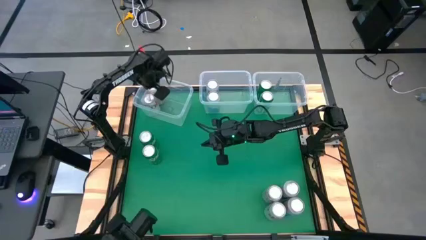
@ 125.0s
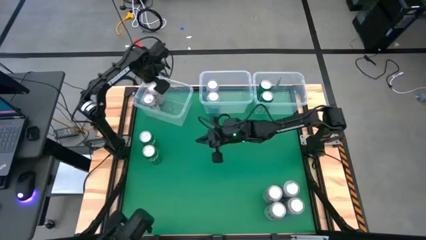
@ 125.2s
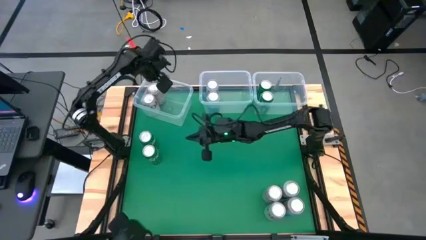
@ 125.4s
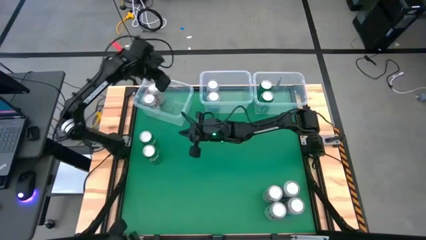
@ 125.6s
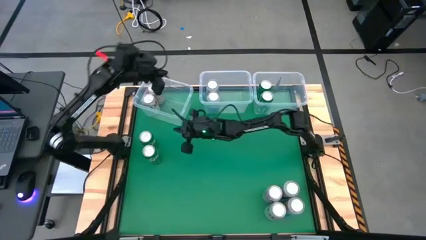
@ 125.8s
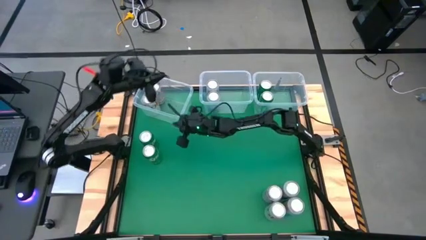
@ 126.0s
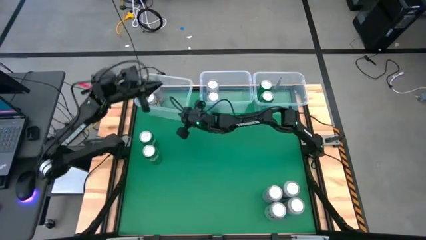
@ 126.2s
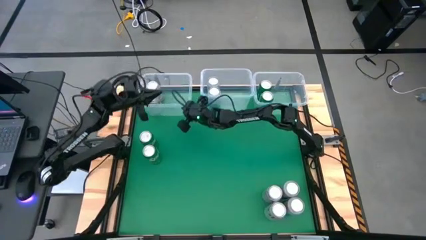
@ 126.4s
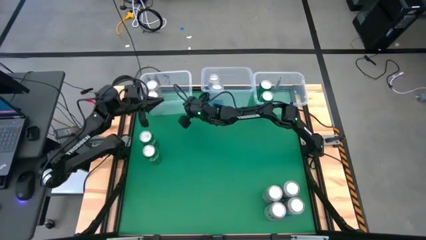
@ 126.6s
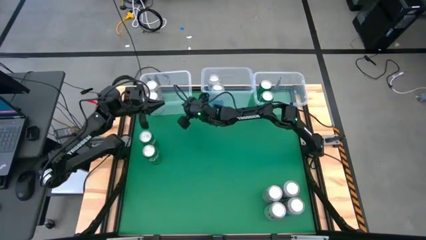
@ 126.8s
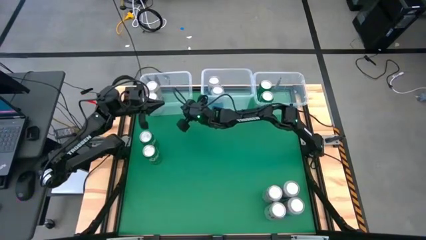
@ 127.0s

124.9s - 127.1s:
Task: Sort soda cans
Adjust the left transparent bin

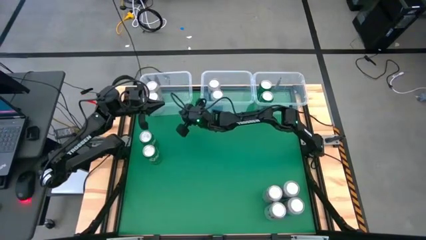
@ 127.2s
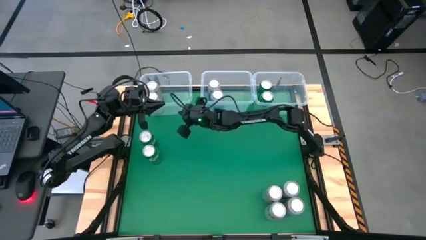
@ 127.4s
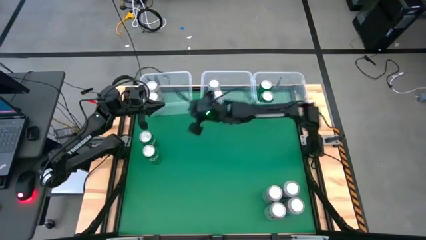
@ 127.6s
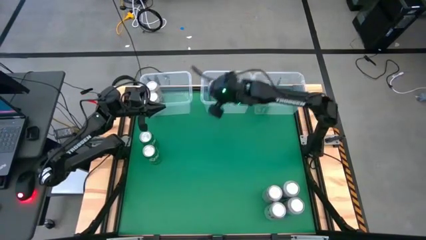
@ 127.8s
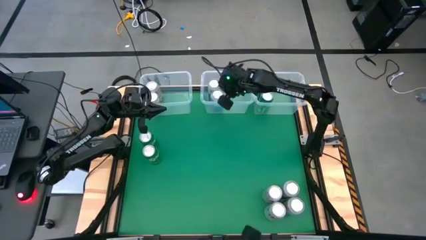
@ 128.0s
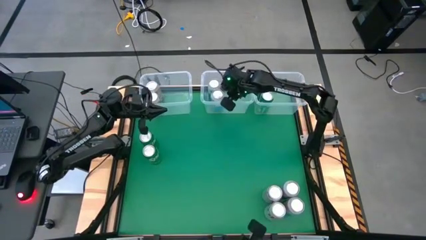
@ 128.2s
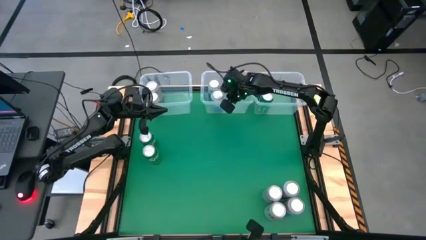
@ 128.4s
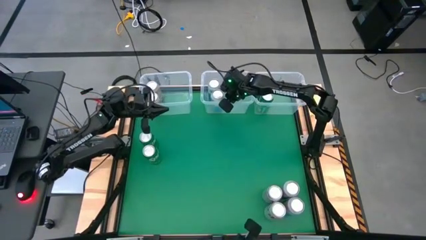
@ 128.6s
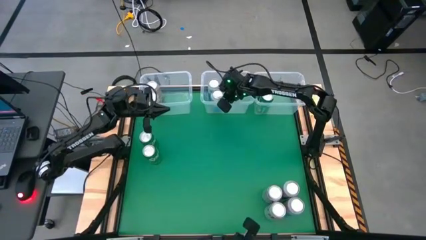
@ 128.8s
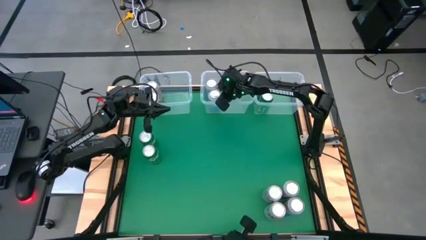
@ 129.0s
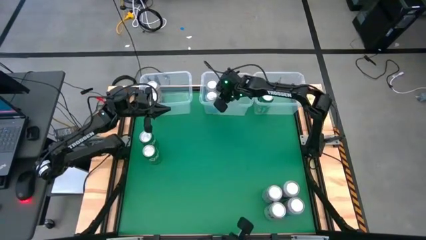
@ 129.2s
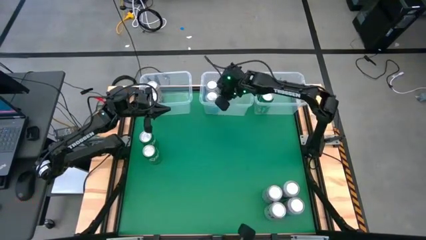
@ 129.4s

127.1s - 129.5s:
Adjust the blue white soda can in the middle transparent bin

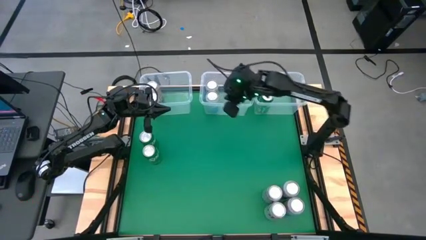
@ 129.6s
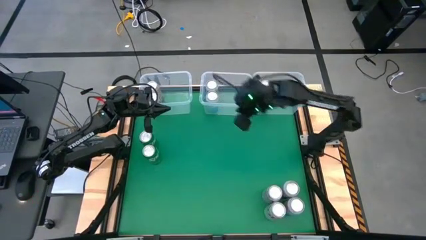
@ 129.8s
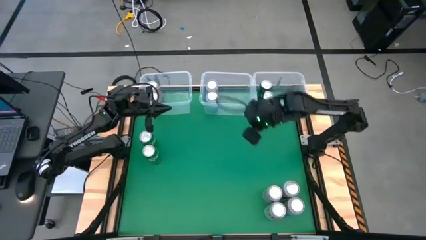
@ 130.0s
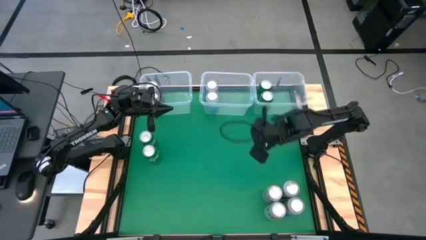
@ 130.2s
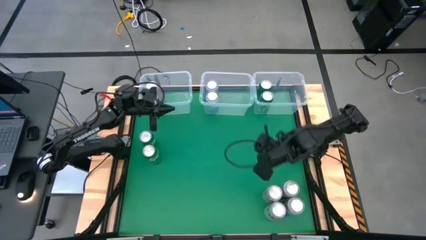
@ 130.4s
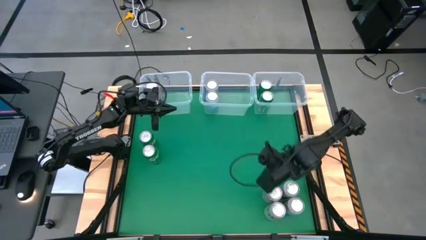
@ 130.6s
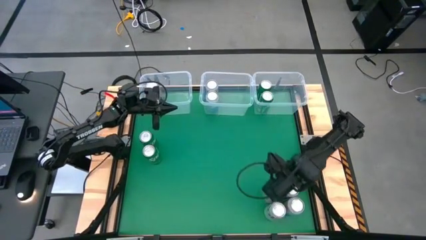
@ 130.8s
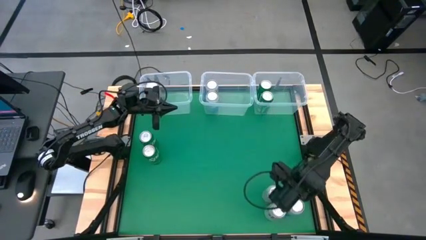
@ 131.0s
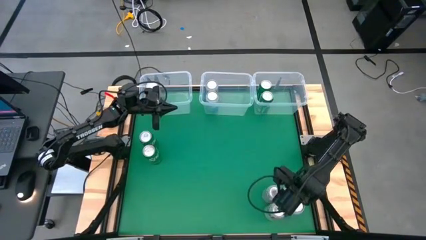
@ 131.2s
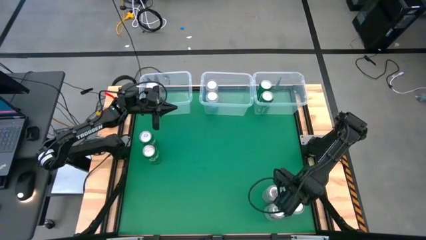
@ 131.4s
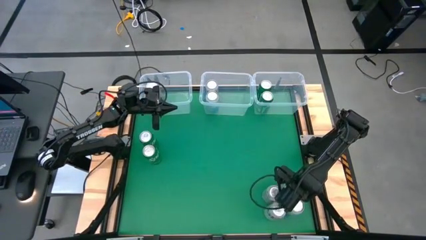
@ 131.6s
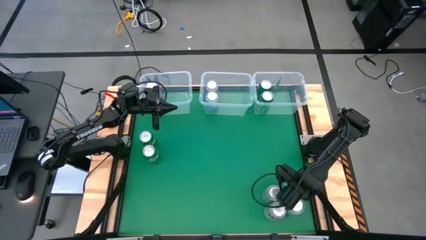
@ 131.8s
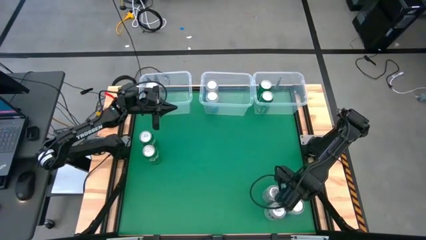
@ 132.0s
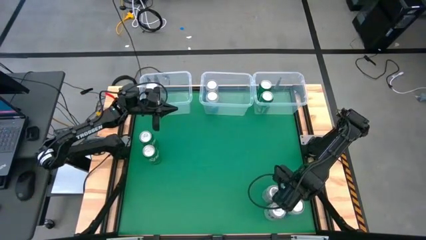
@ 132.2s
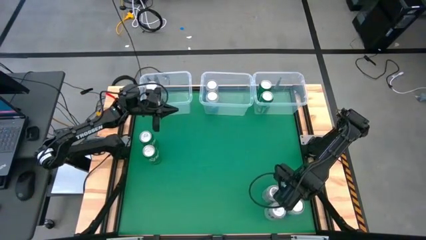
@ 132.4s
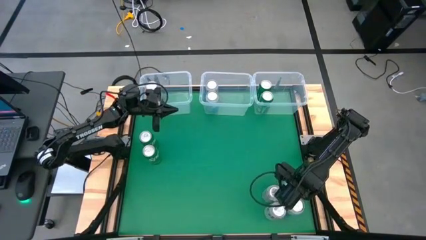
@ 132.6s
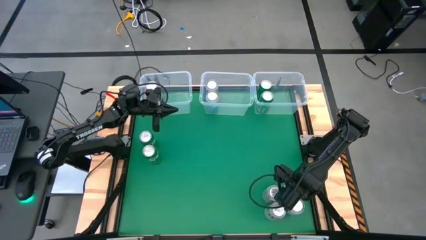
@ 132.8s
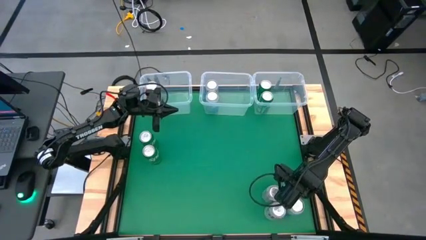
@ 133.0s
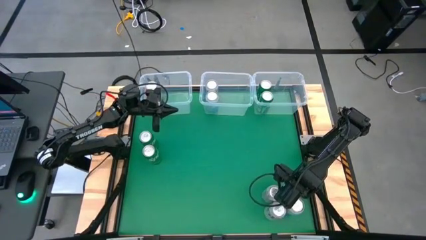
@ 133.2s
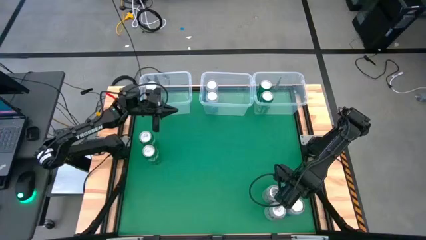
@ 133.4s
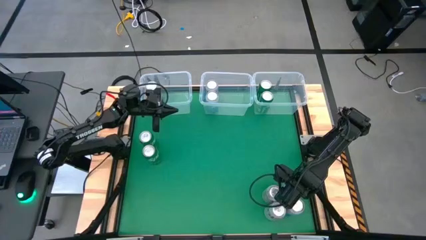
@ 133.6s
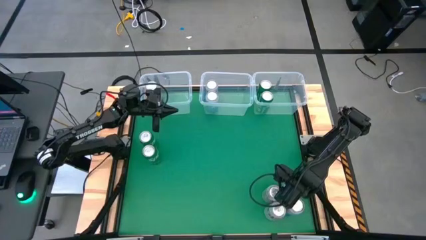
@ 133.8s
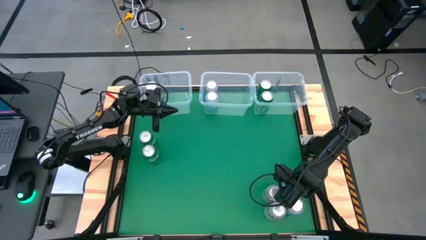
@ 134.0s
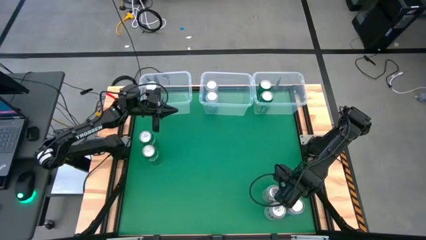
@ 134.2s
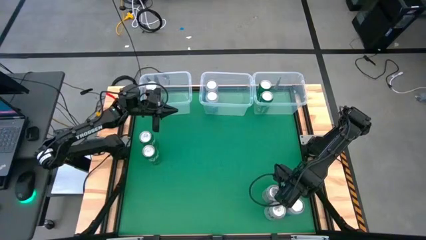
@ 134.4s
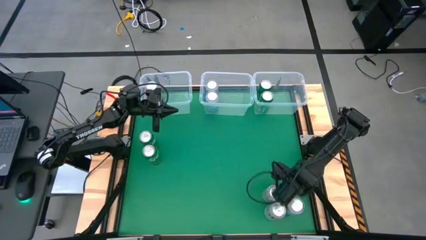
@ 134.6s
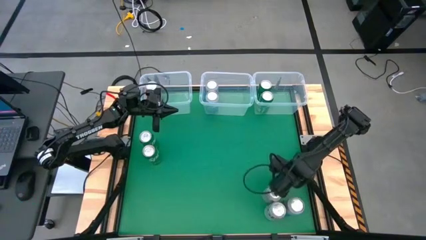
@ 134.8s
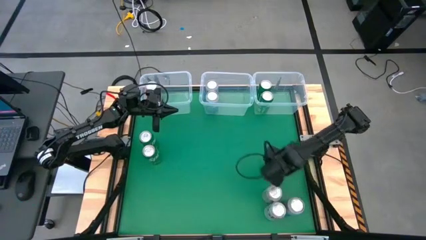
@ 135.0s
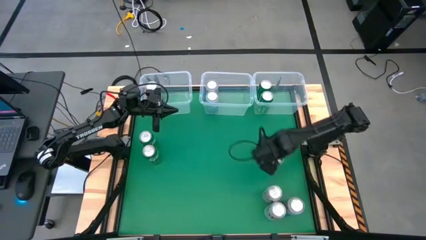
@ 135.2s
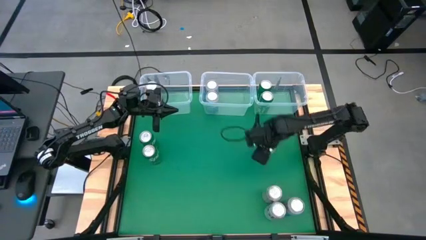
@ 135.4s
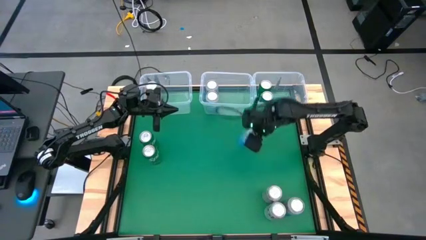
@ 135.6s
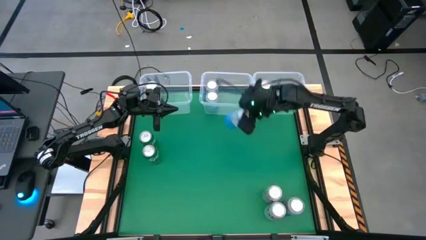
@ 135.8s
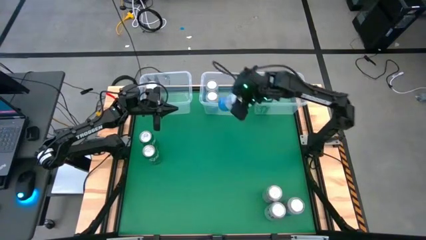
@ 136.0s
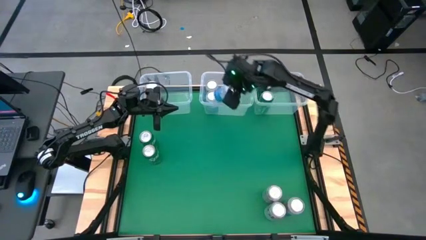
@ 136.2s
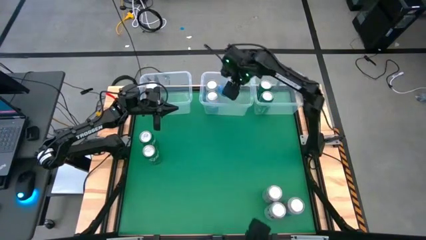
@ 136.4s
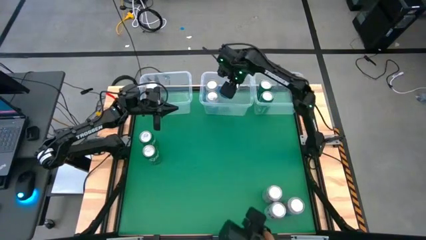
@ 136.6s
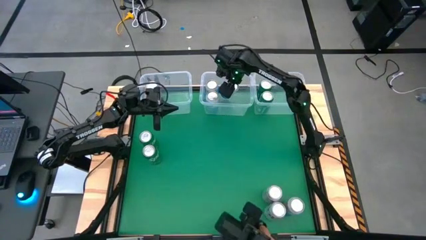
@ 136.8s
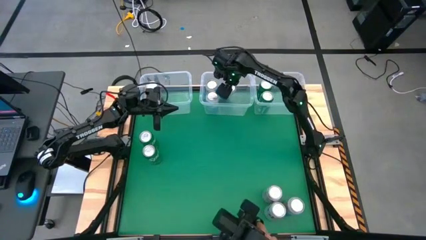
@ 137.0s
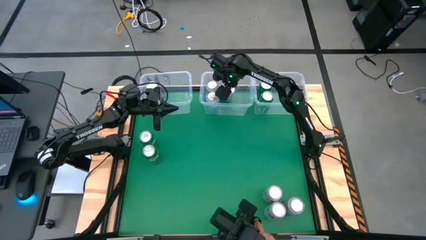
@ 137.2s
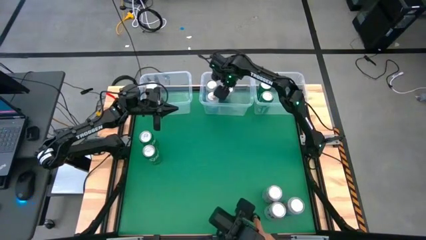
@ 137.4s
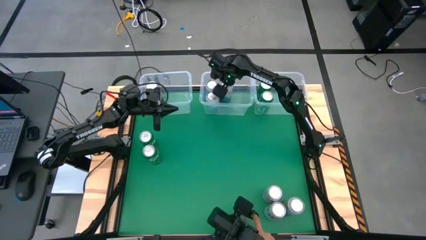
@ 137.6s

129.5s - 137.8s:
Put the top blue white soda can into the middle transparent bin

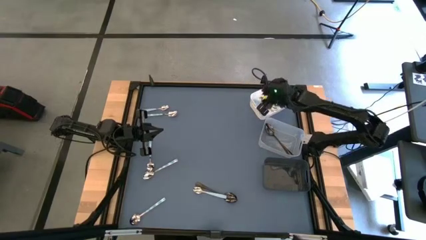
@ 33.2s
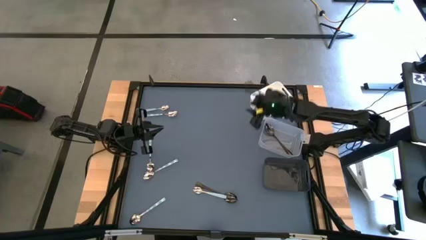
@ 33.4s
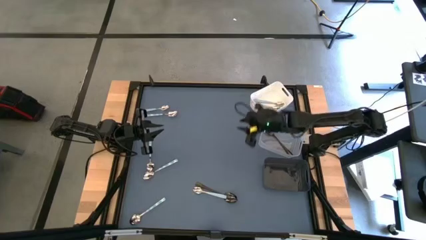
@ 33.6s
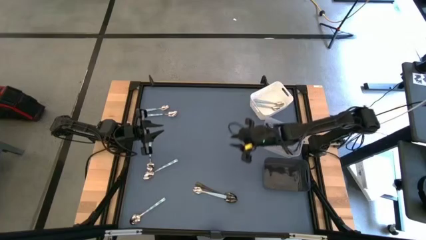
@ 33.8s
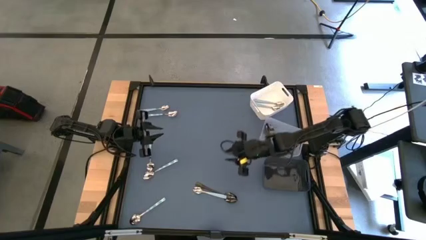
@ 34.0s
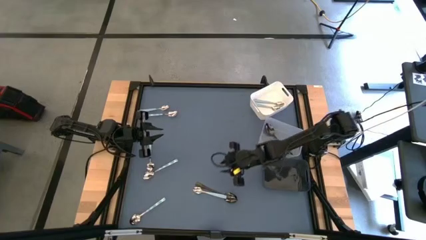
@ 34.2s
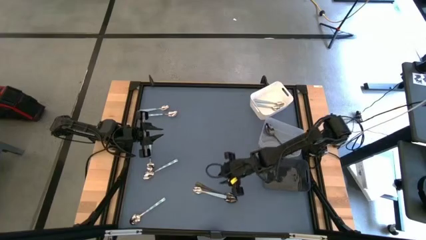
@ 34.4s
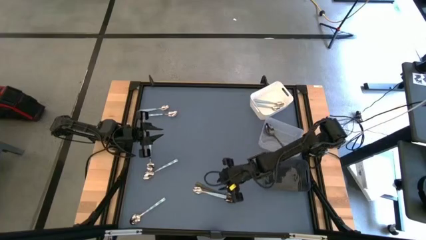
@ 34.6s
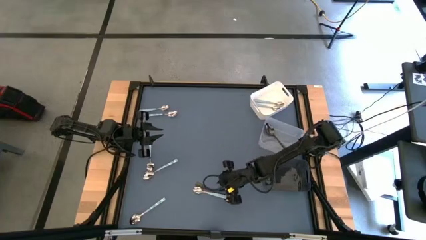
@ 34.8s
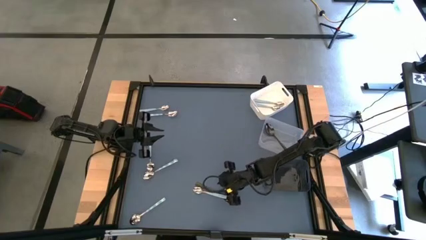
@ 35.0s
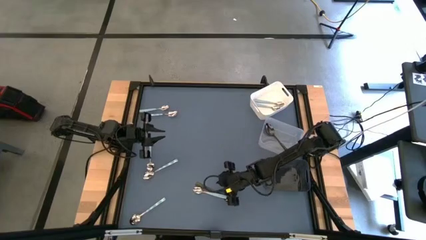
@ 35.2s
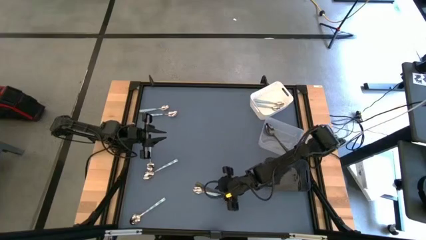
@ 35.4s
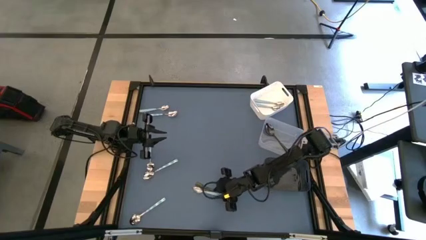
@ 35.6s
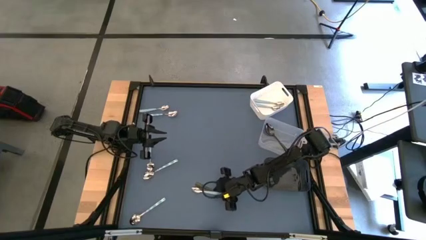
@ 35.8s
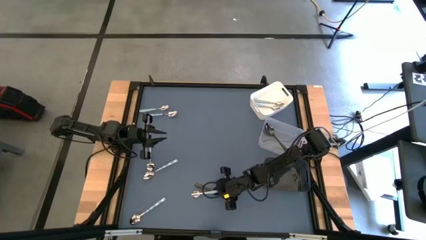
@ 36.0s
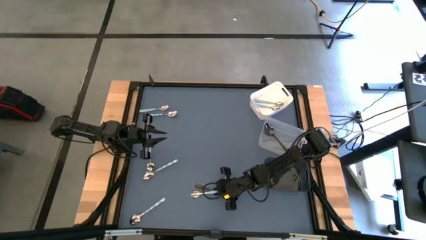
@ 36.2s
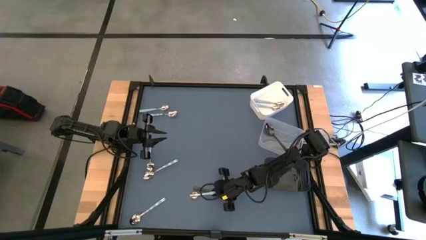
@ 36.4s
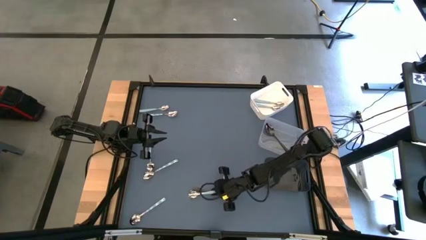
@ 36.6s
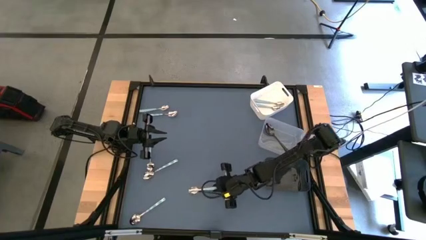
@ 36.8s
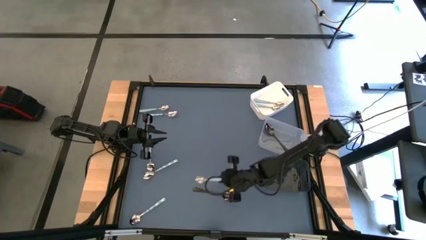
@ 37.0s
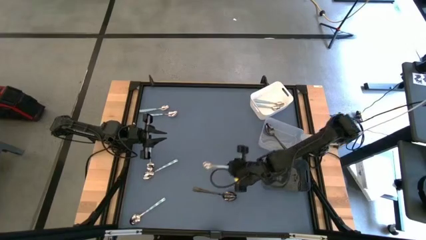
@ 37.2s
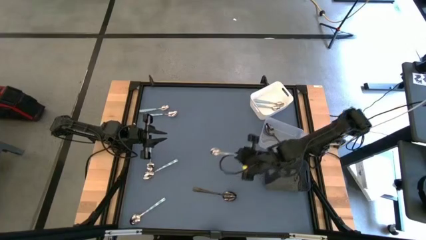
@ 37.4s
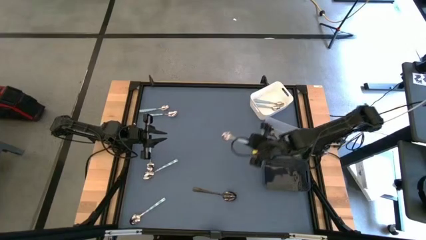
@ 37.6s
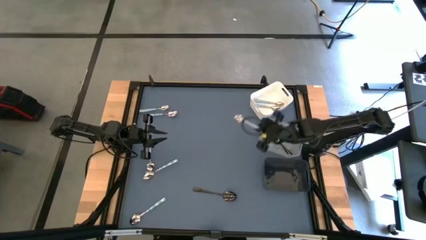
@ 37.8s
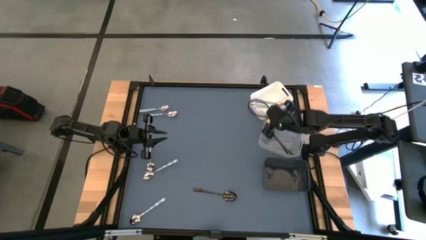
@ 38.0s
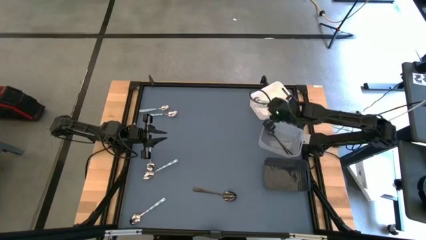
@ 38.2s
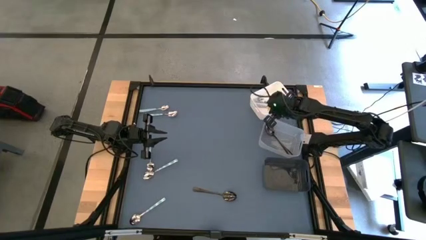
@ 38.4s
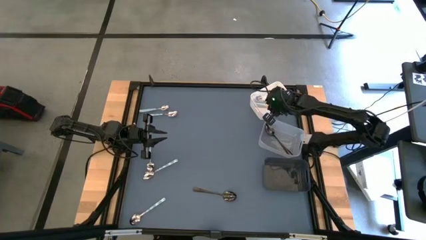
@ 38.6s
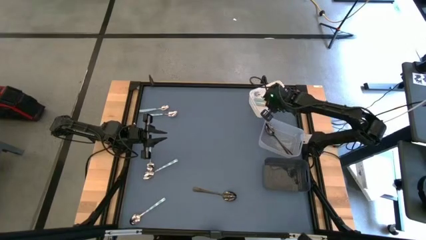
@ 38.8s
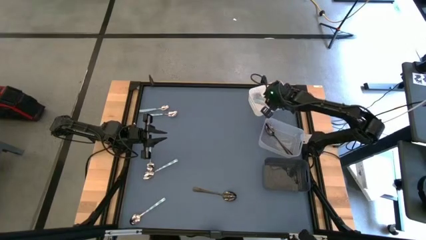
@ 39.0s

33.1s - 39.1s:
Task: Sort silverware by color (type)
Put the bottom light blue spoon into the white bin
